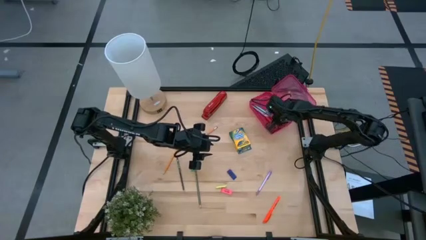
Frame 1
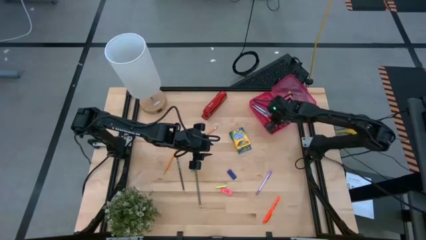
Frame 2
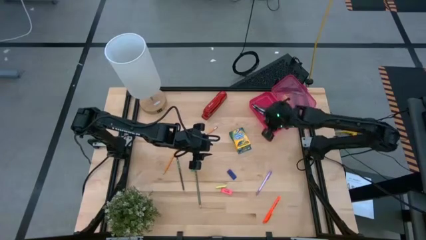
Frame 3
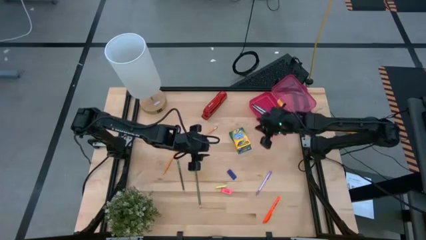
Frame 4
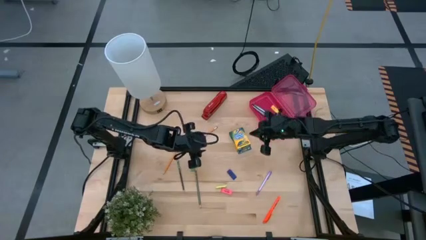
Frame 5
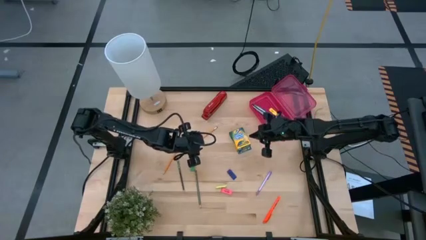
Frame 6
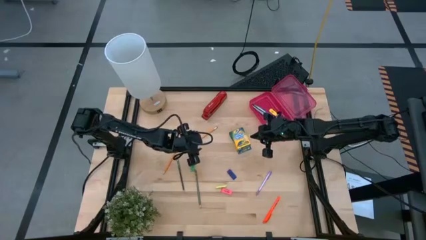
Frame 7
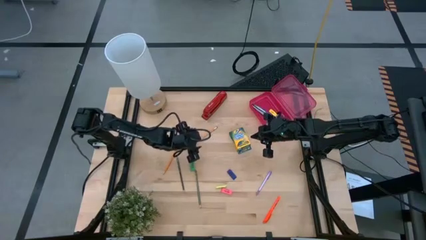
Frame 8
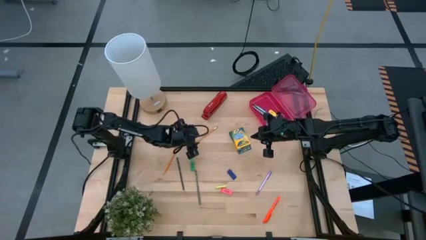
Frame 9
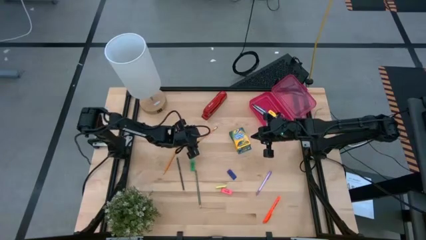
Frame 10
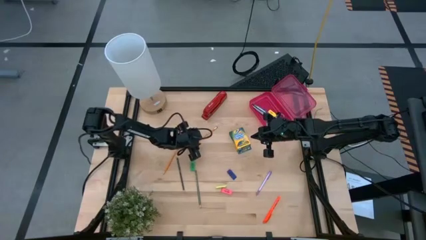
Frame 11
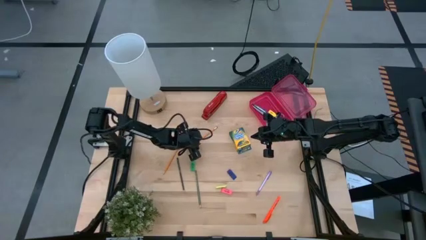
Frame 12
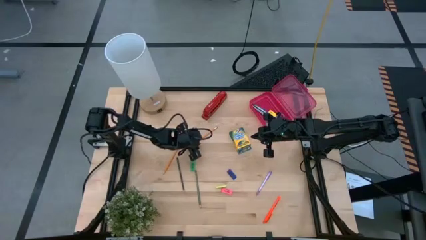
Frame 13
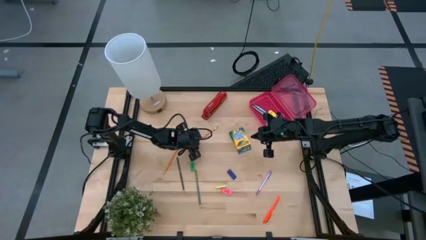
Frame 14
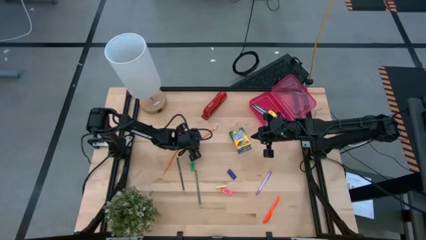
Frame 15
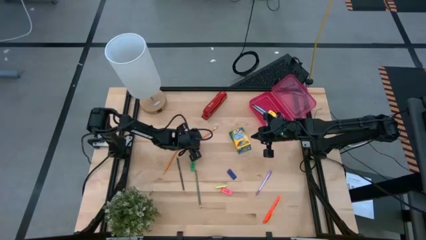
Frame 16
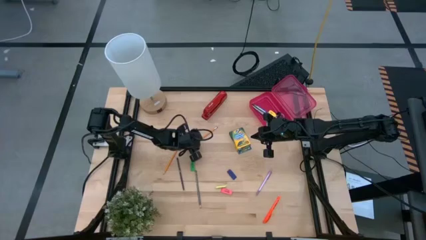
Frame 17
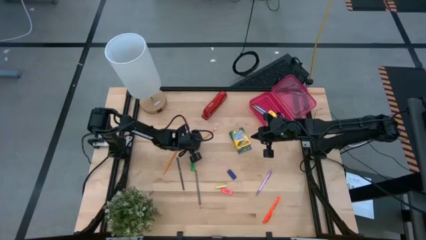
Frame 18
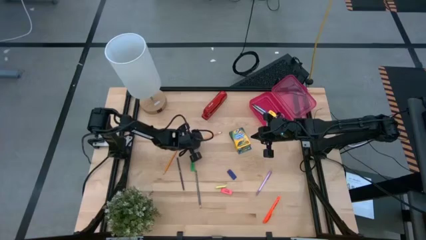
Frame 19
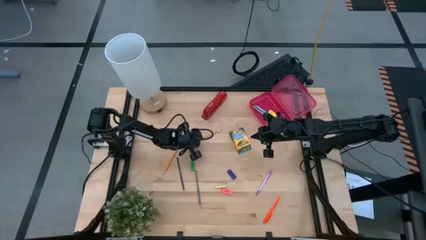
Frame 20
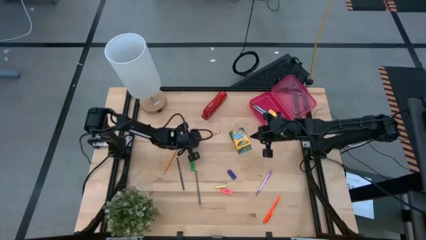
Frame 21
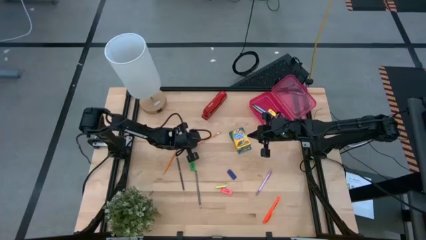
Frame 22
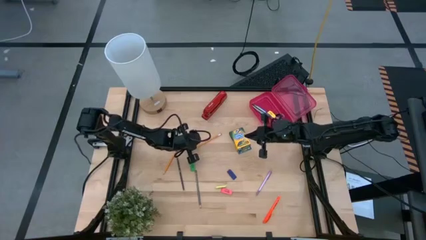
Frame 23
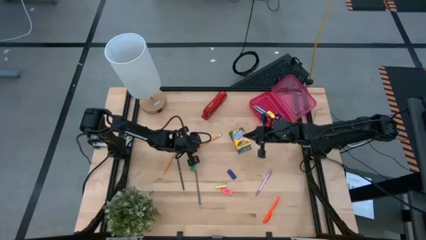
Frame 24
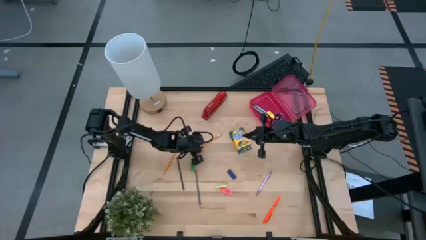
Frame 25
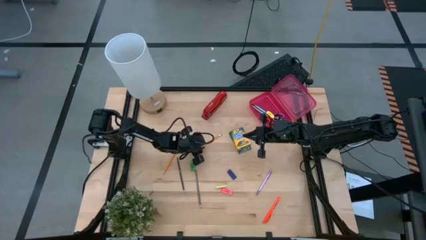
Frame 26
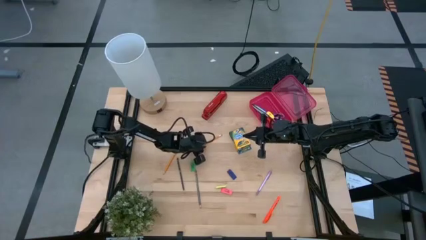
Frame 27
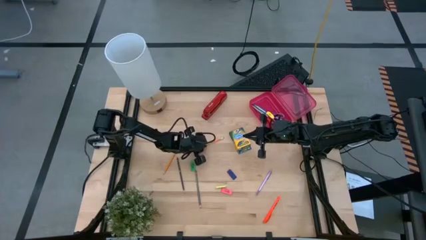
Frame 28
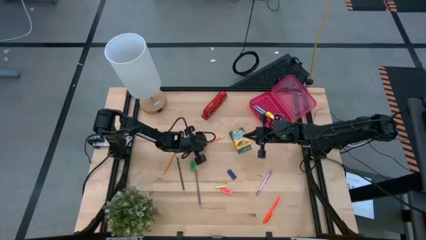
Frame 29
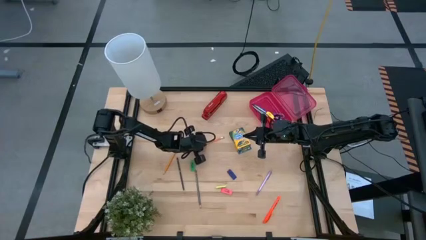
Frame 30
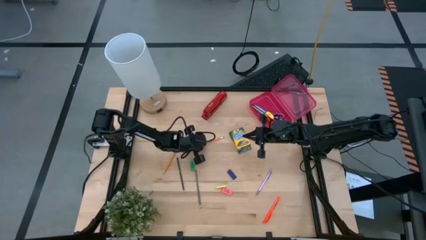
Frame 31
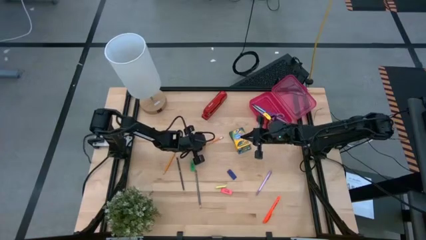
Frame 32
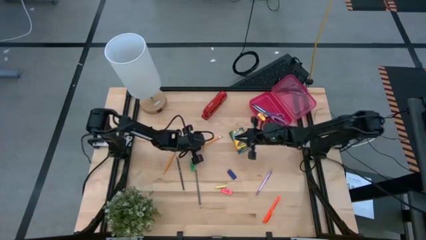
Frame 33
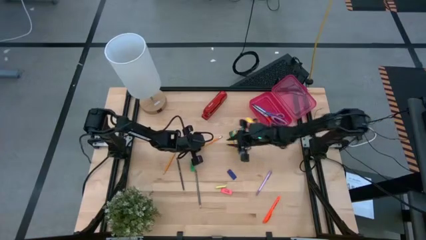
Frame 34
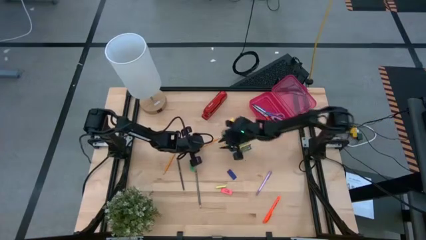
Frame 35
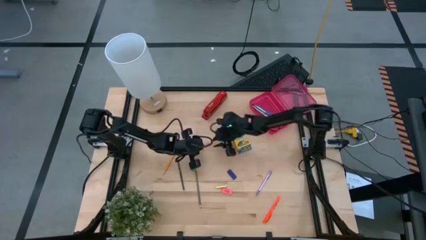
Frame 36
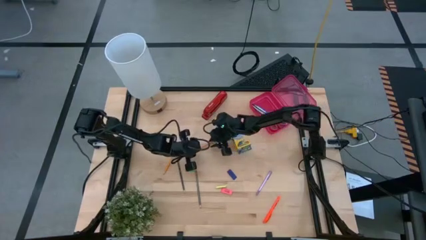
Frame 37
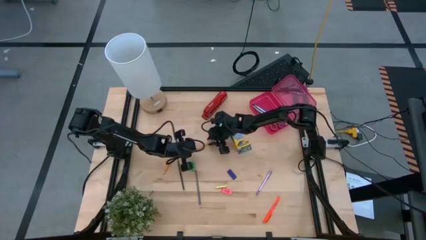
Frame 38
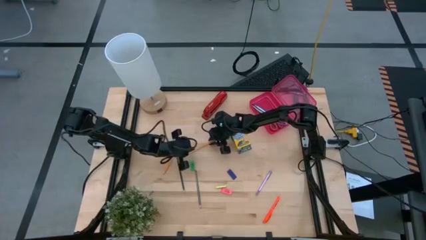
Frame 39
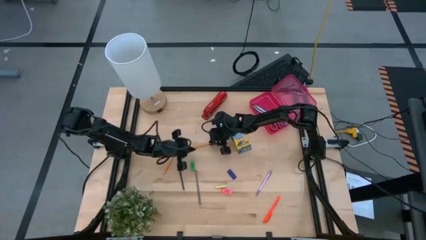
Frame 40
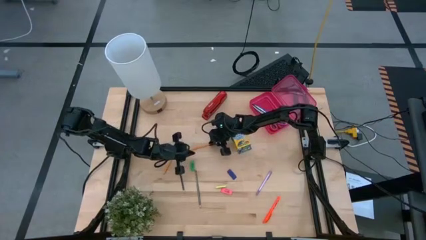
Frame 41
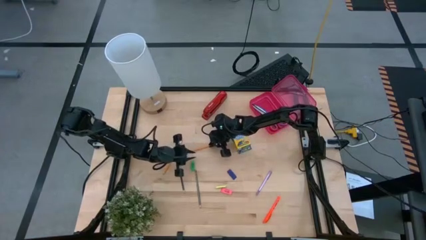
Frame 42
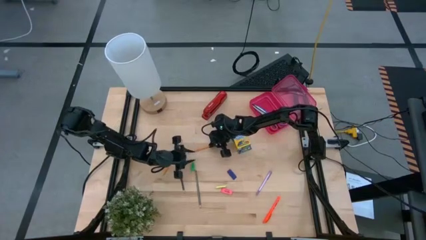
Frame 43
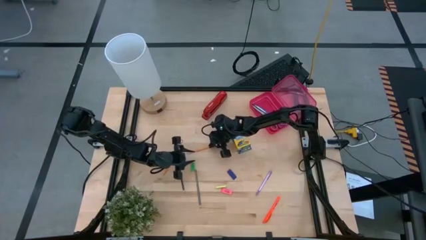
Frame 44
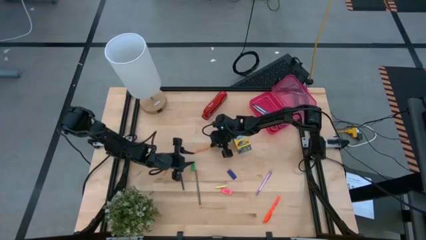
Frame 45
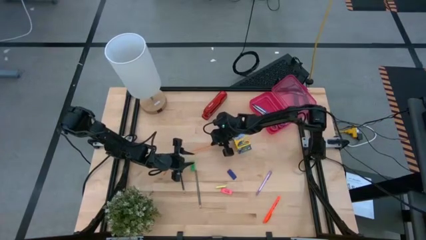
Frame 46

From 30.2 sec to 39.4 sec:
Task: Pack school essentials
Put the right orange pencil into the pink supply box

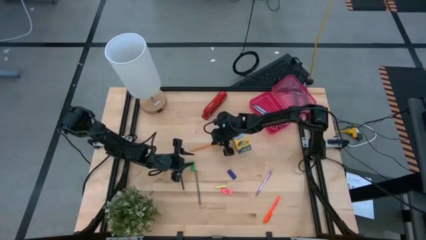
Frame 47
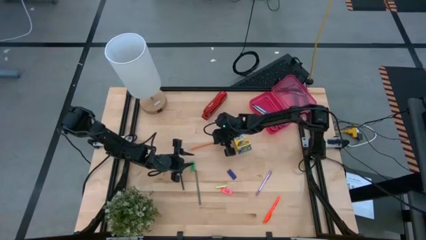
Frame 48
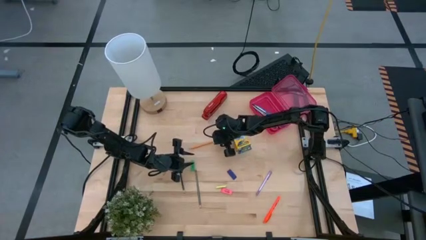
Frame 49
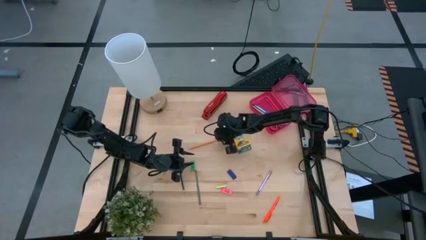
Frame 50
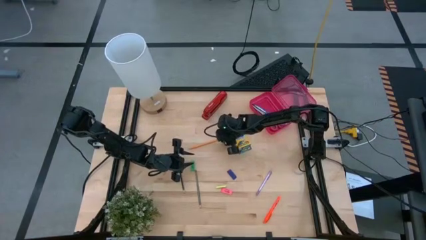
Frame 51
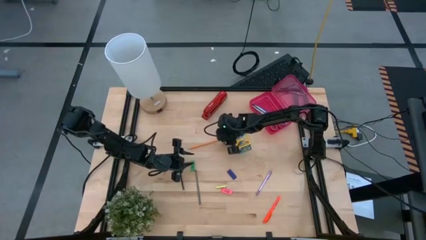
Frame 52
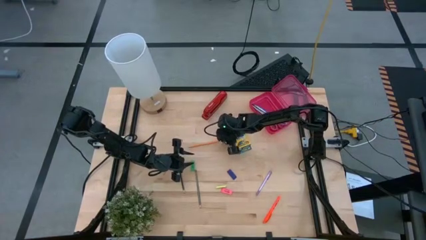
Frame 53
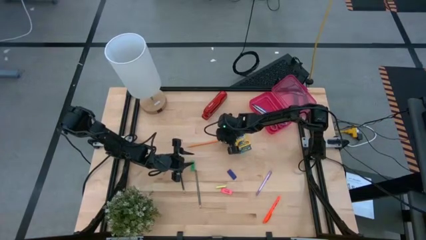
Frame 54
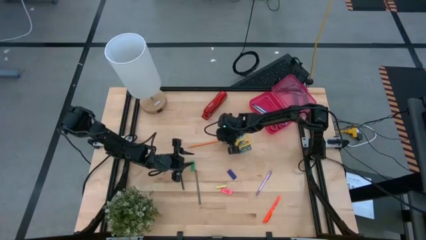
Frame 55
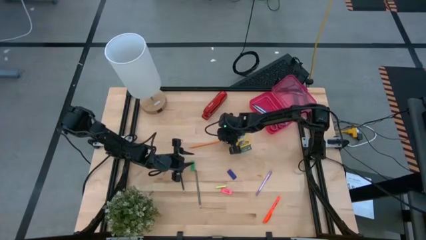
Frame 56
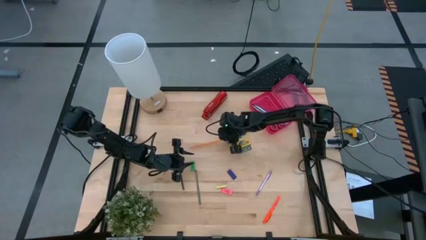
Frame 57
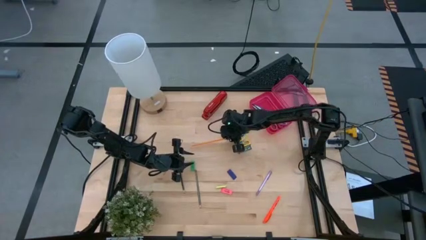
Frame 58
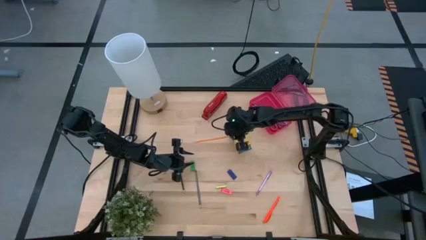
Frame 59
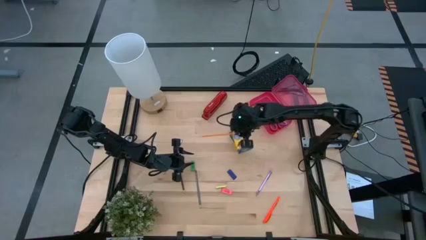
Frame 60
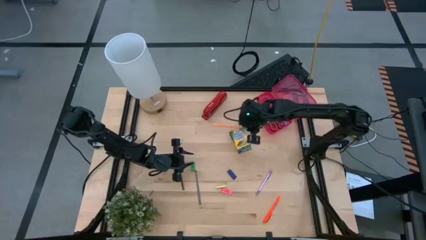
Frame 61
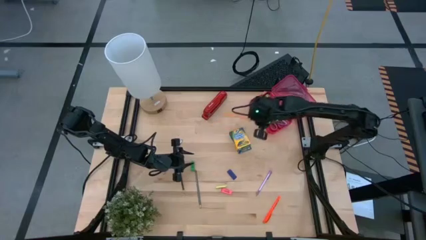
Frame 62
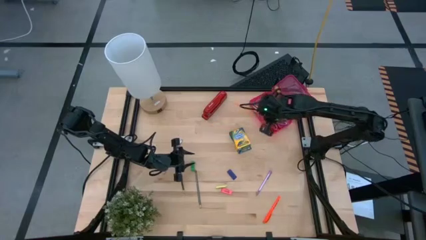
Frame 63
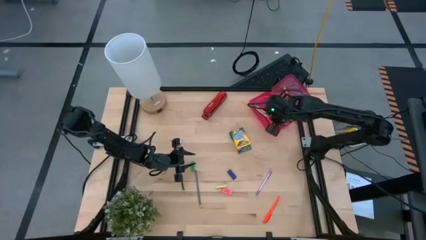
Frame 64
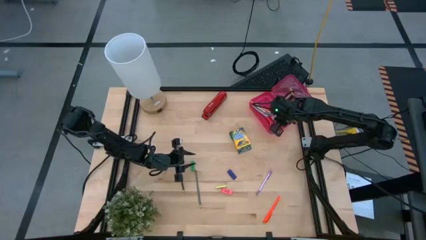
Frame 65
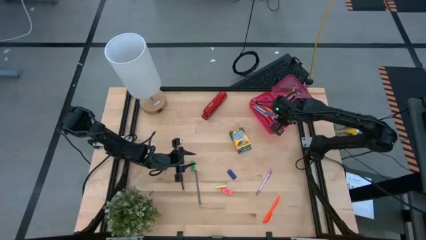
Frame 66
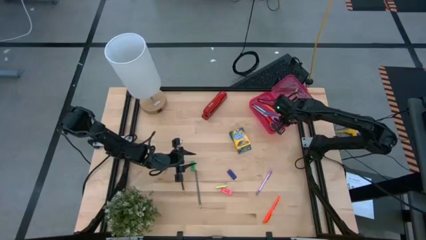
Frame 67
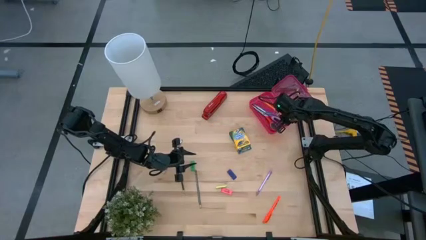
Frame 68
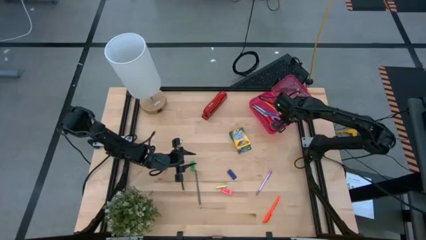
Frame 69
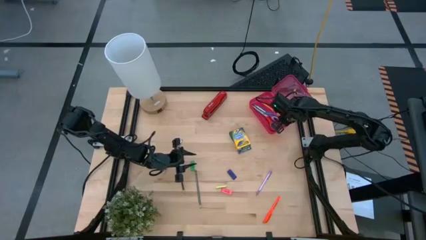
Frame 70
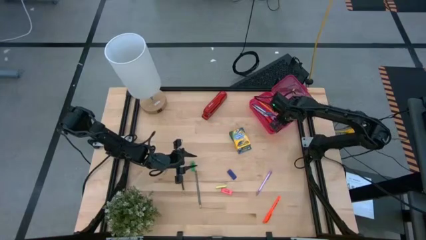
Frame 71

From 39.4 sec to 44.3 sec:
Put the right orange pencil into the pink supply box
